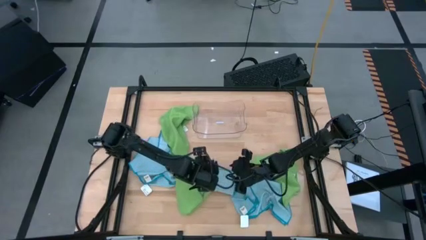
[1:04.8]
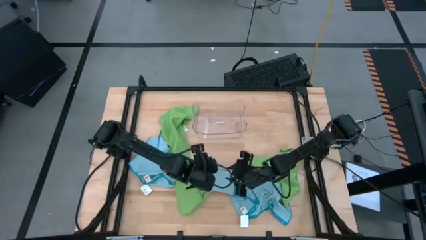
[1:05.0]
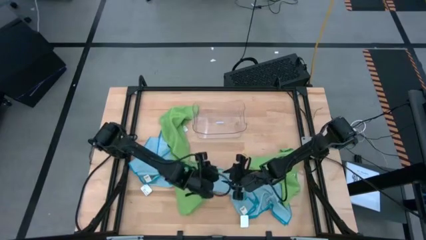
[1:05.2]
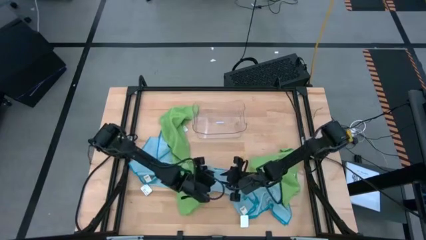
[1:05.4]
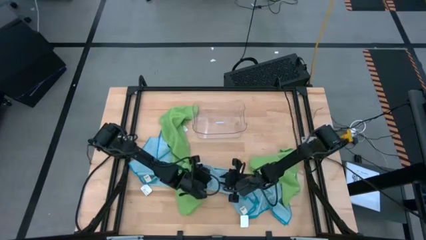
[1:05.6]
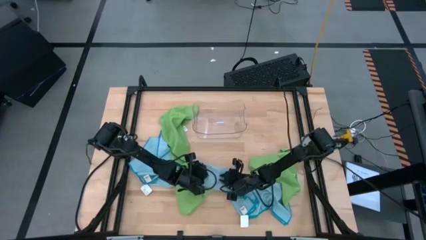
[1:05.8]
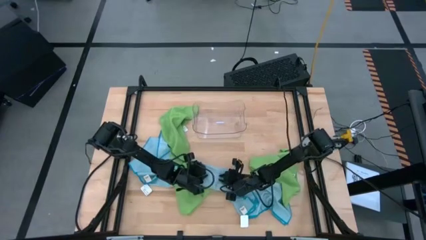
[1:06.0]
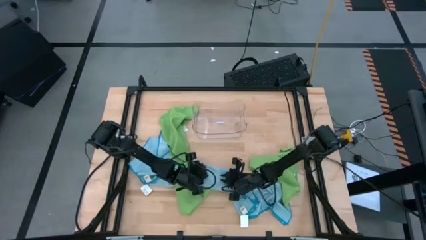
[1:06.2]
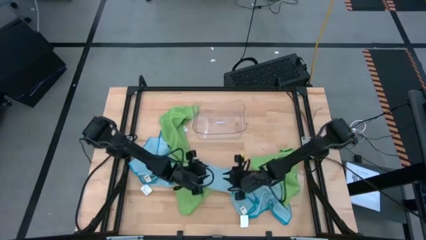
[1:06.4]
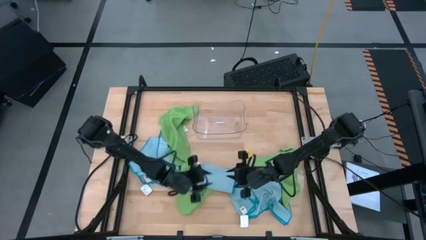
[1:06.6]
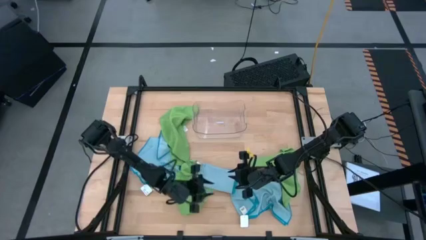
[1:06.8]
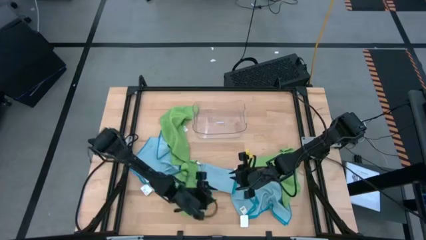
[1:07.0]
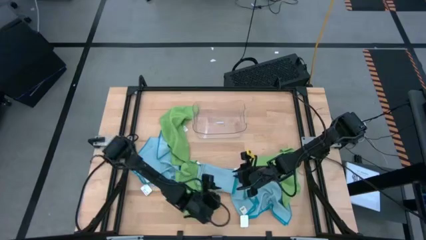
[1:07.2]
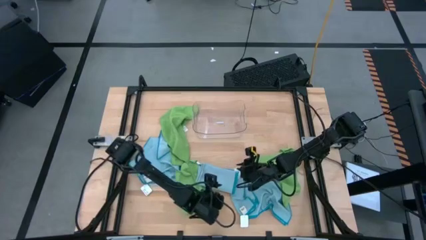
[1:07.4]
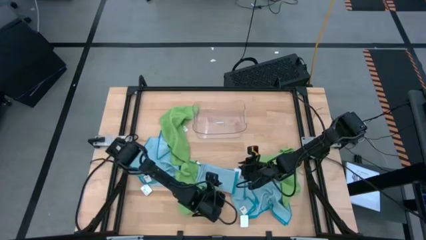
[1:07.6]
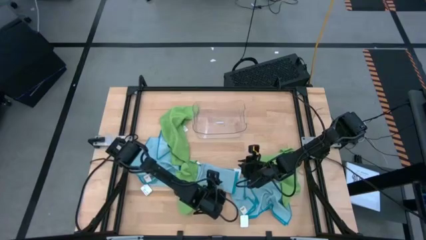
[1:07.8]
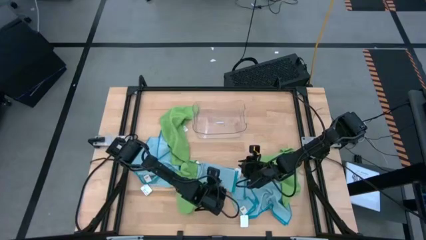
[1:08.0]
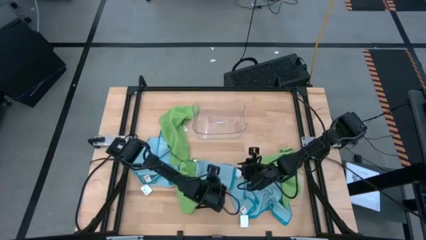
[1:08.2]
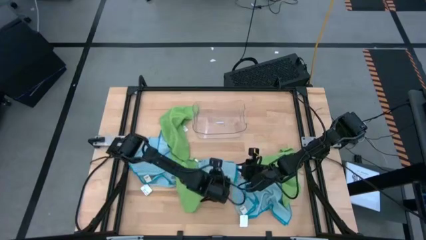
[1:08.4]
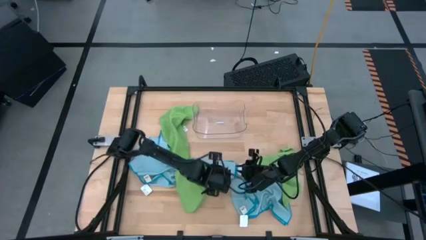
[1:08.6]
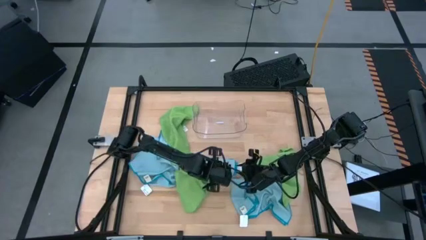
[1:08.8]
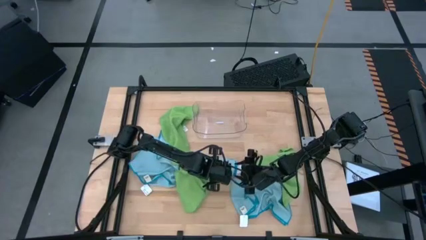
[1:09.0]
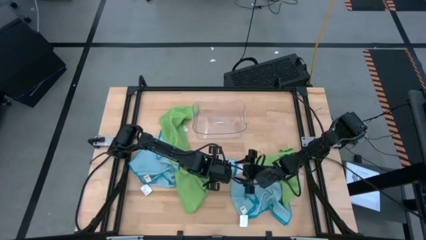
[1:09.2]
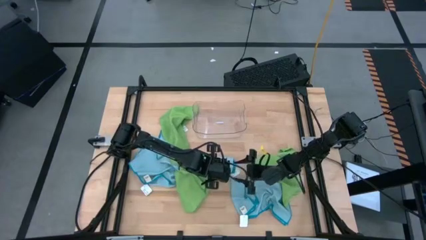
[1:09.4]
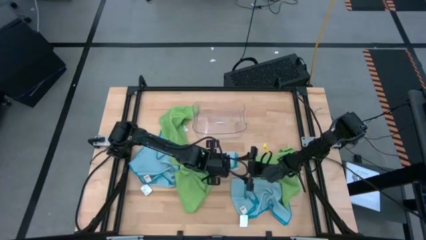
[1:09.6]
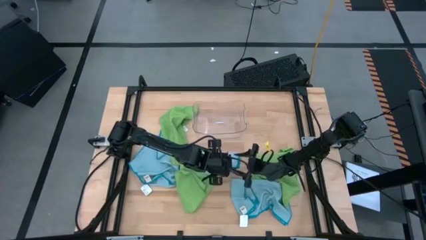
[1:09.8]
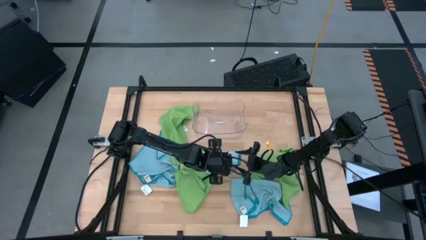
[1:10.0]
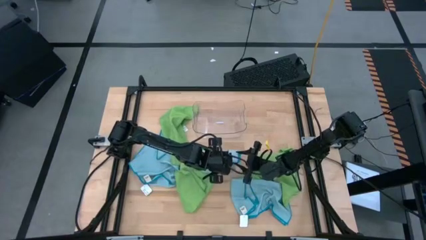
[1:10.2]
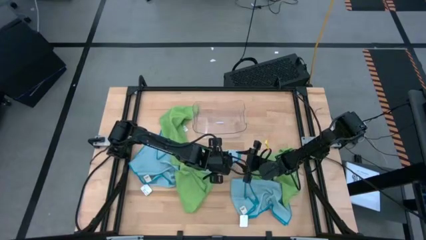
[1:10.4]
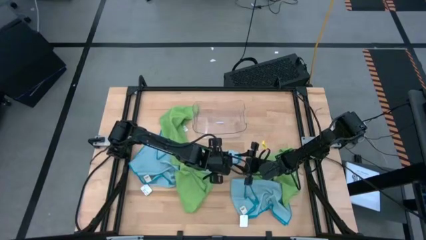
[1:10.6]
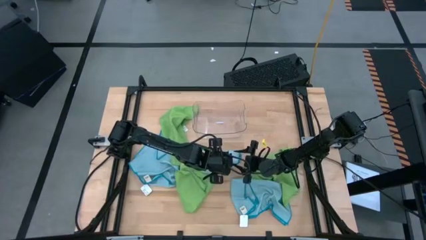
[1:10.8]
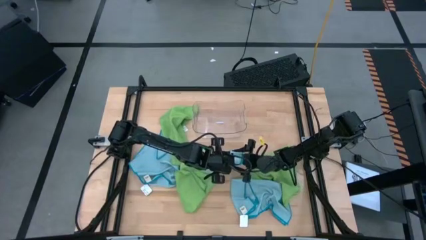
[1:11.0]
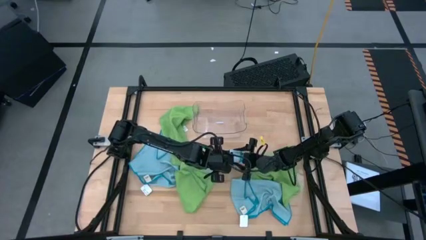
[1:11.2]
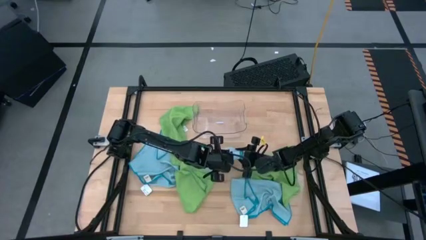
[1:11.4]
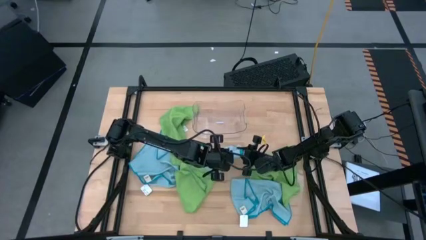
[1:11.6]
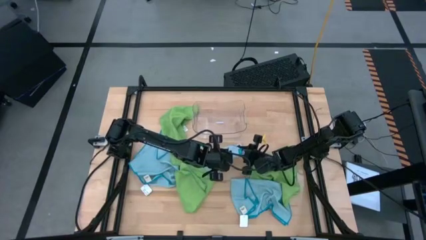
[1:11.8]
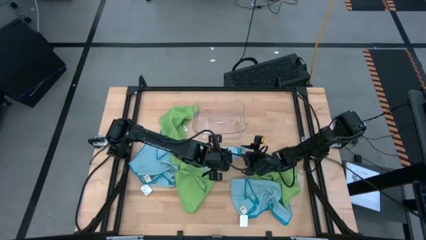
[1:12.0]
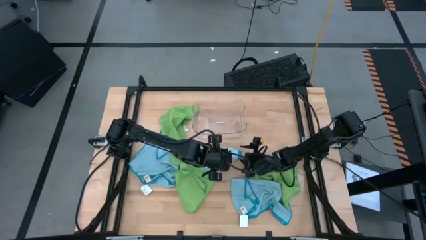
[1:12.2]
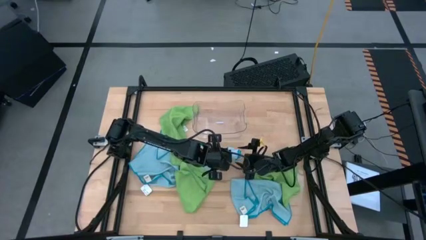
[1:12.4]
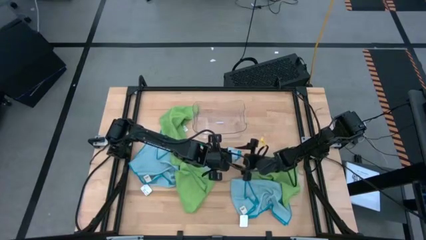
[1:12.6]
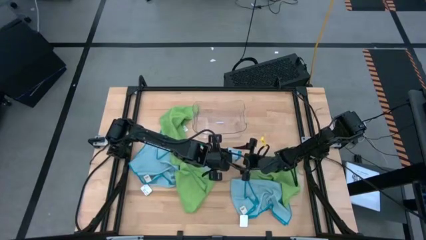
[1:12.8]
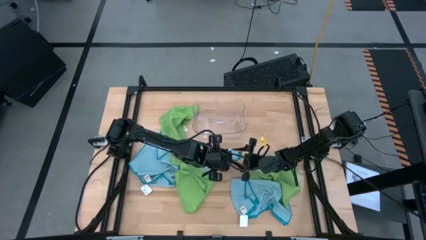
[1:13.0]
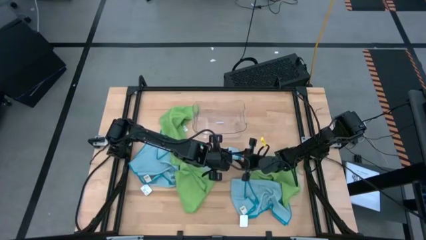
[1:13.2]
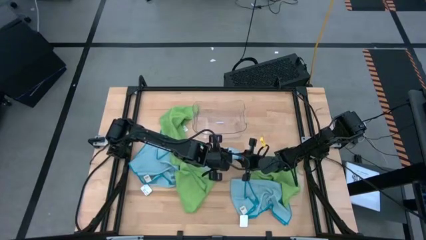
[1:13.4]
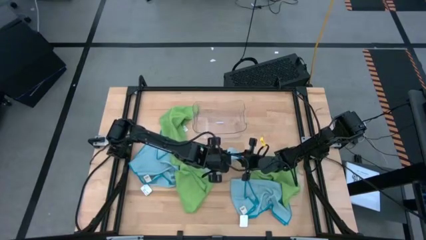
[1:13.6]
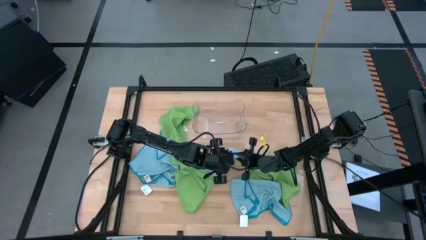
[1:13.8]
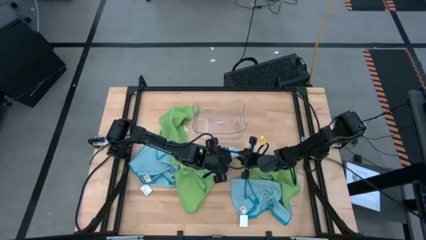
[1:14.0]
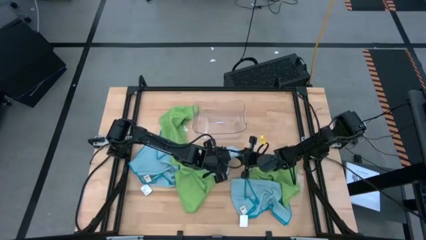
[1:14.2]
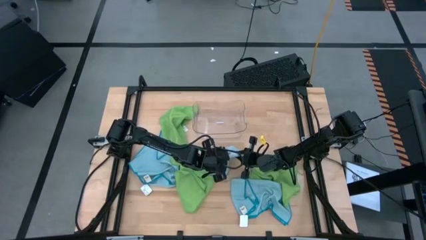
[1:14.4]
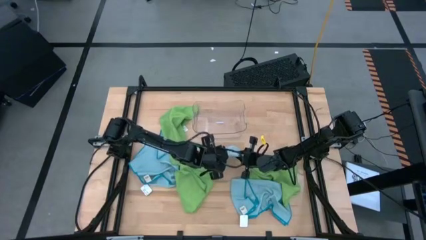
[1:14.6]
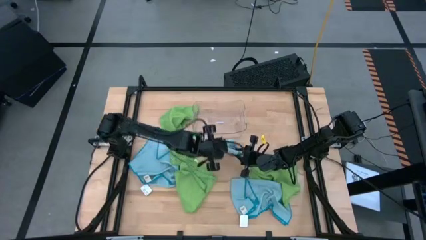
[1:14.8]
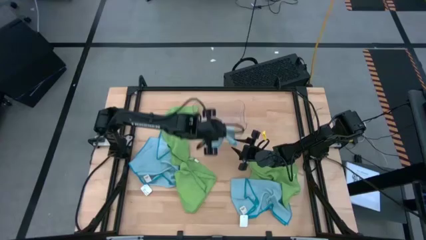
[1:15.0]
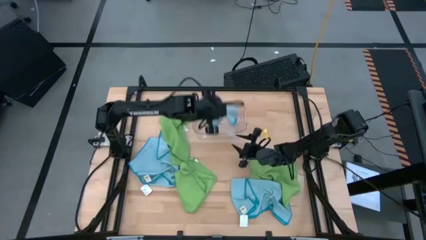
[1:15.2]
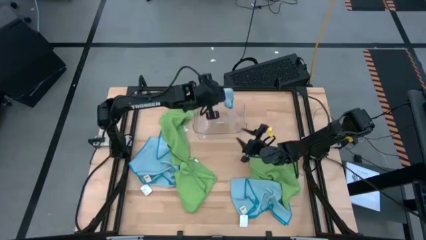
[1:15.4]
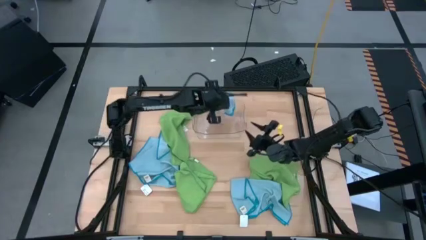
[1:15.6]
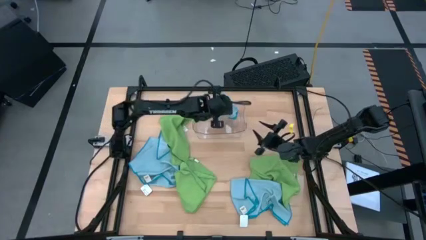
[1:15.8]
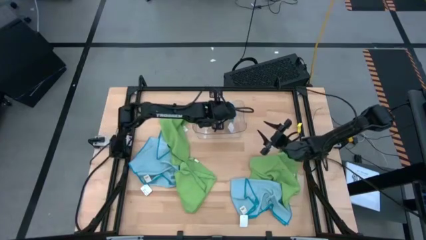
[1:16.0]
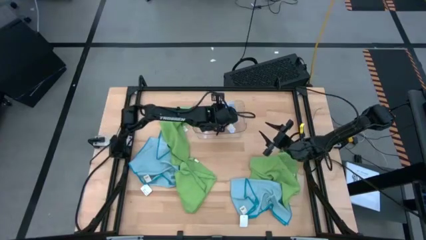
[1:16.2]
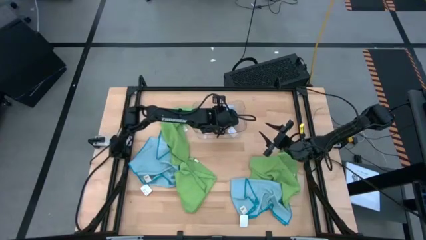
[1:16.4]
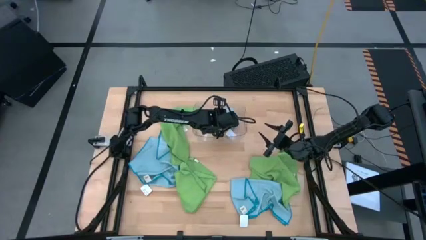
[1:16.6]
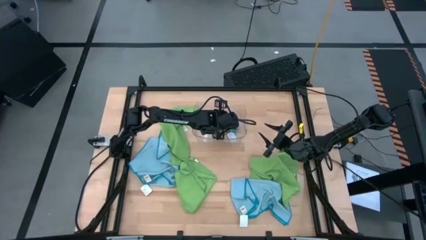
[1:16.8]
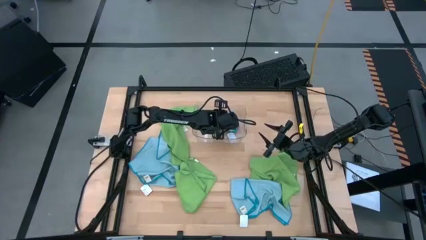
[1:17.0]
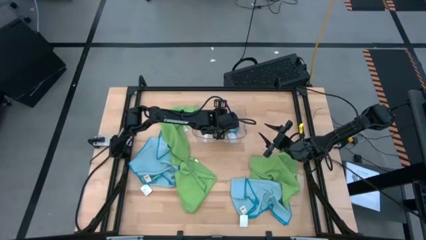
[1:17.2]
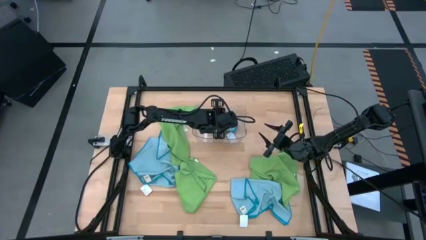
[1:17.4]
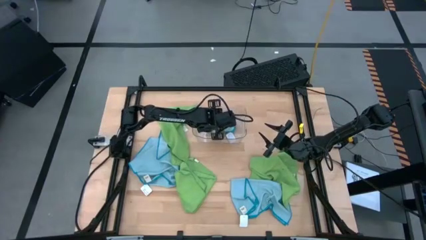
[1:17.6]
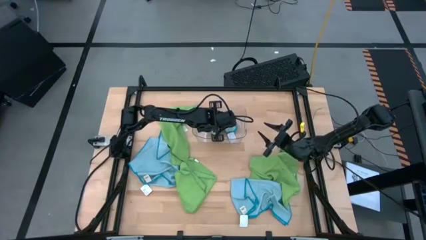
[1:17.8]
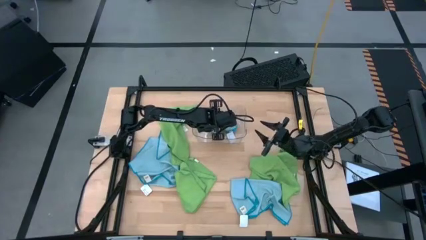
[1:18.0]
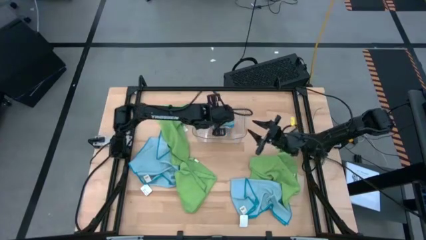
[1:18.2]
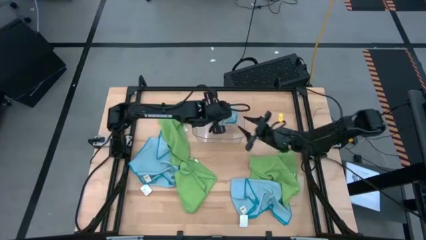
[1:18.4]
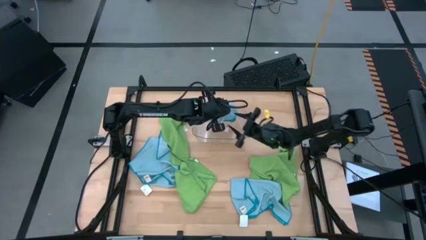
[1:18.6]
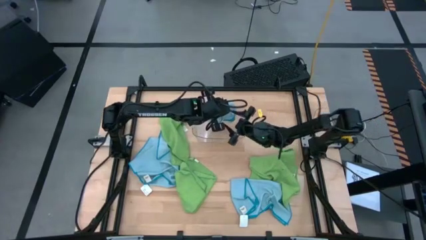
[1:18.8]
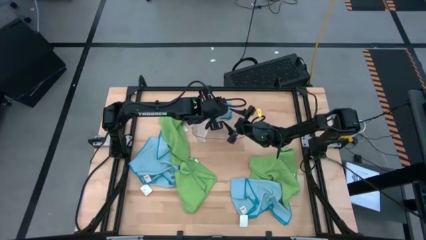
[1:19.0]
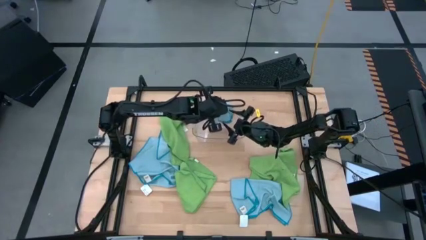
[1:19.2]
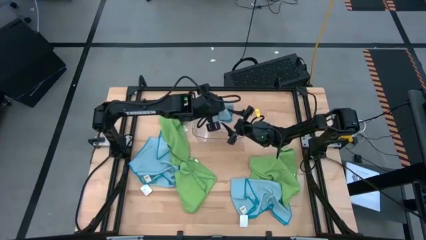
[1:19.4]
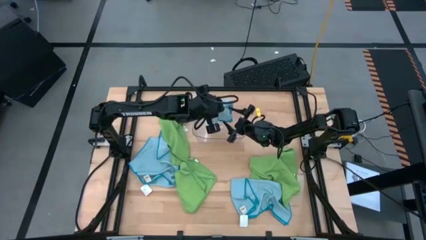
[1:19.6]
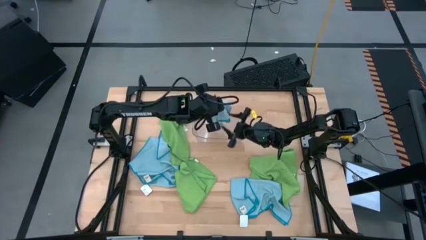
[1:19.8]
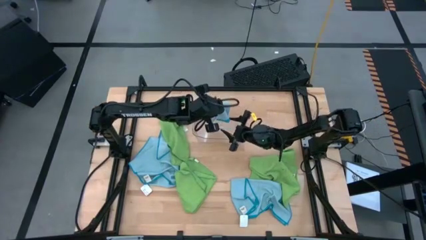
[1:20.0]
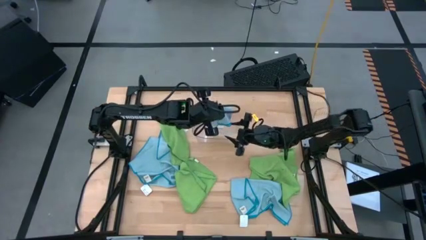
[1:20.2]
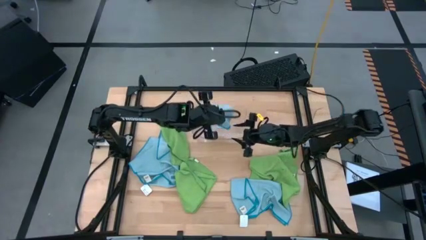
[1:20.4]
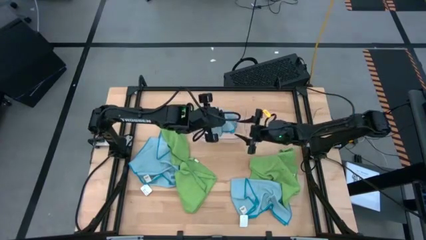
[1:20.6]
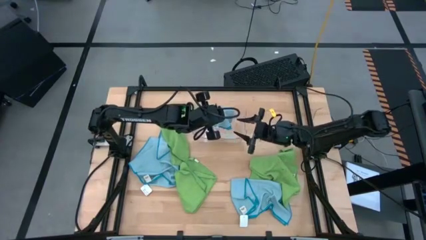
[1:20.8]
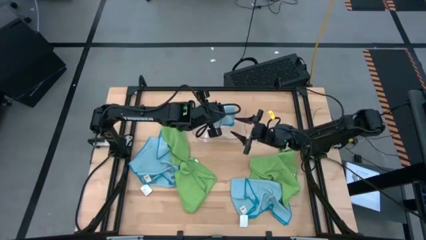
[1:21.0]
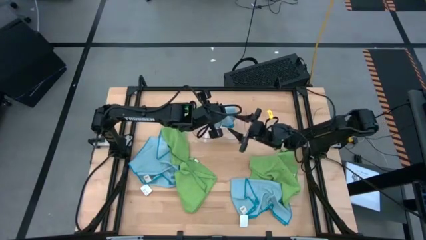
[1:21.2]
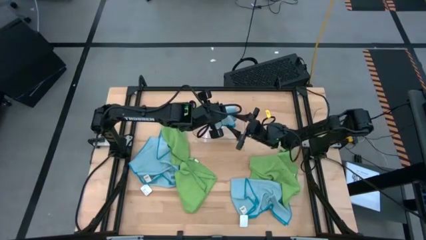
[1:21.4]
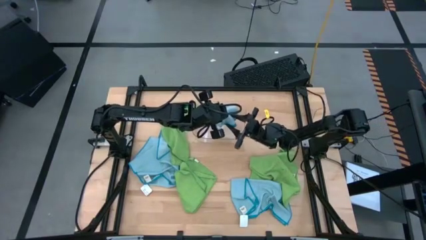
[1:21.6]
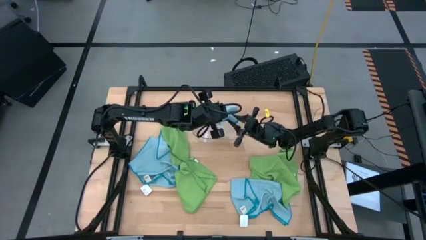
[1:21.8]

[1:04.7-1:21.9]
Task: Fold microfiber towels
Put the folded top right blue microfiber cloth into the transparent bin
